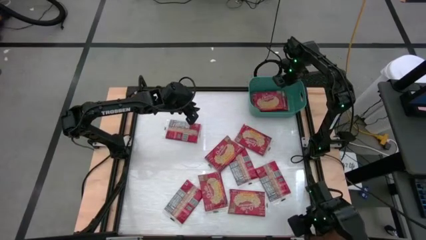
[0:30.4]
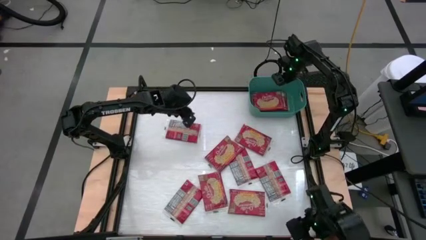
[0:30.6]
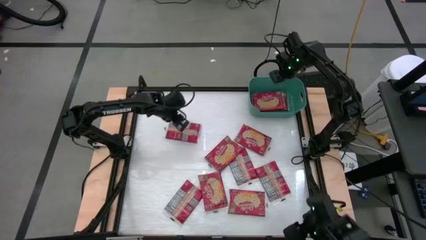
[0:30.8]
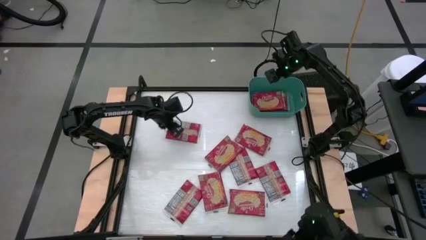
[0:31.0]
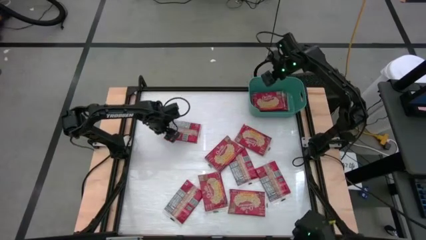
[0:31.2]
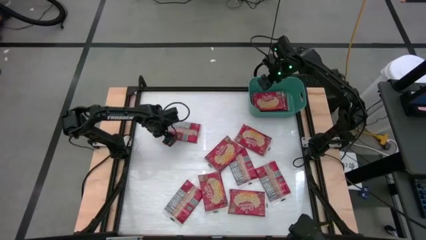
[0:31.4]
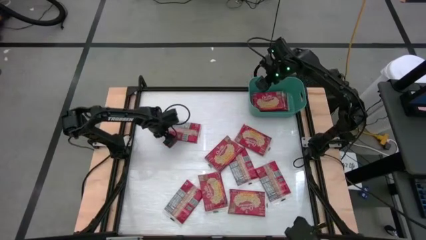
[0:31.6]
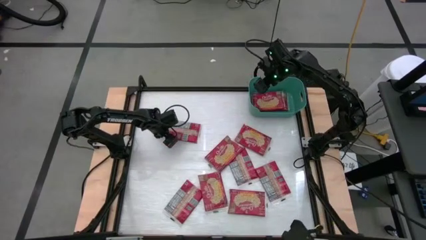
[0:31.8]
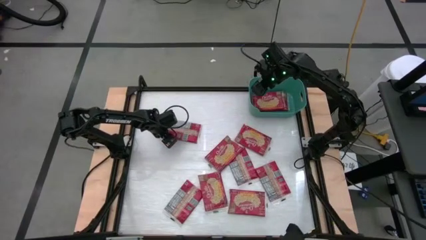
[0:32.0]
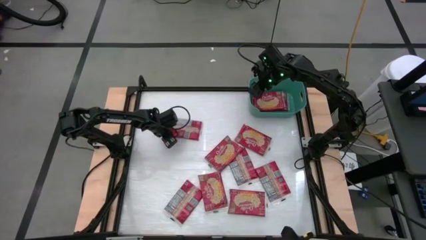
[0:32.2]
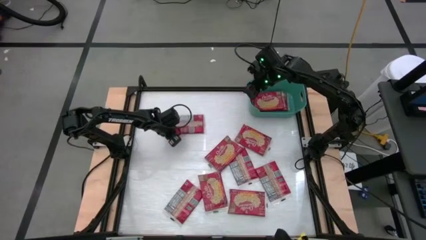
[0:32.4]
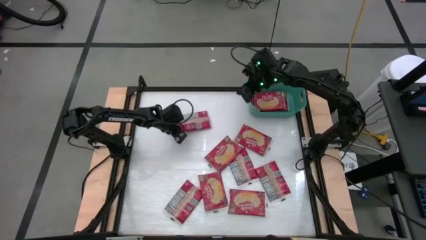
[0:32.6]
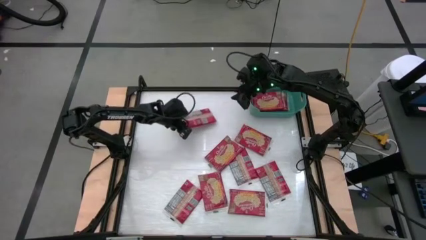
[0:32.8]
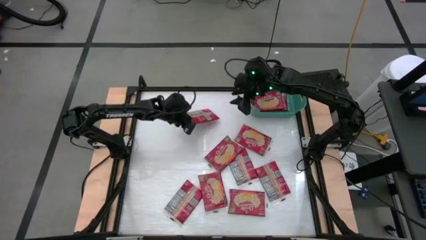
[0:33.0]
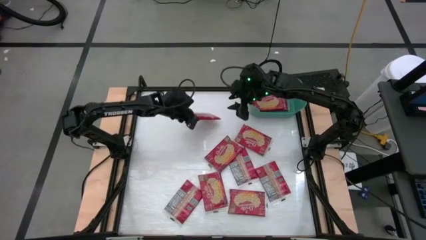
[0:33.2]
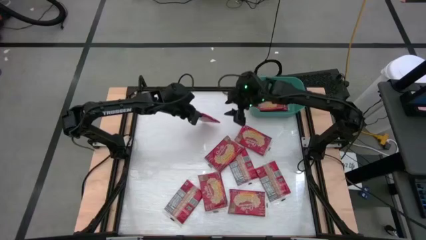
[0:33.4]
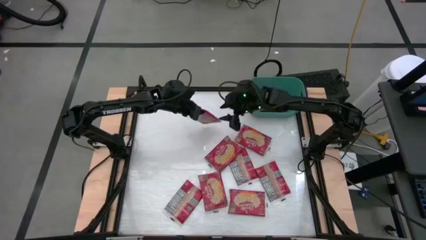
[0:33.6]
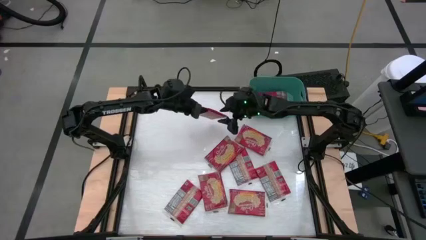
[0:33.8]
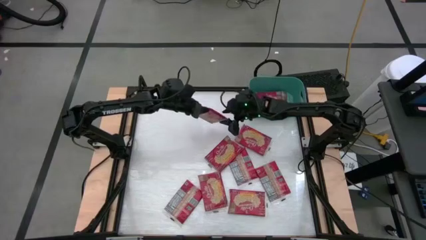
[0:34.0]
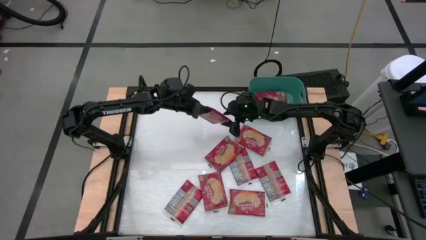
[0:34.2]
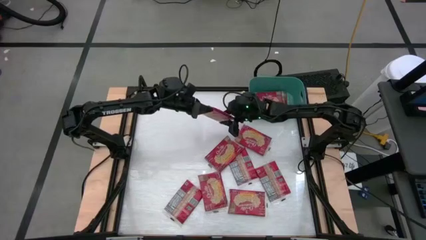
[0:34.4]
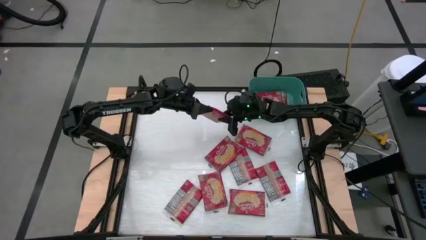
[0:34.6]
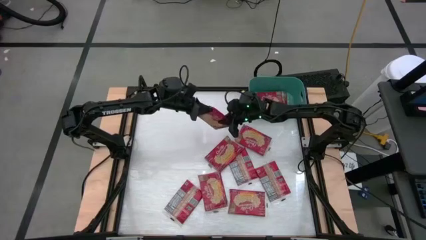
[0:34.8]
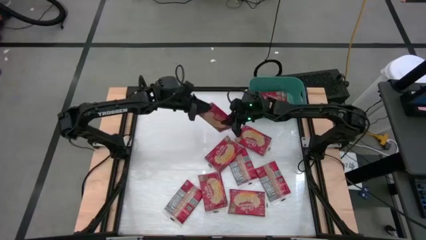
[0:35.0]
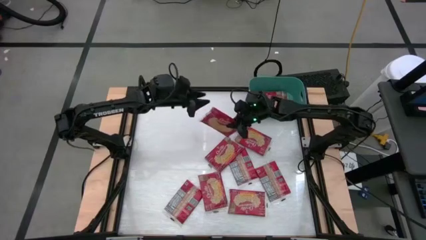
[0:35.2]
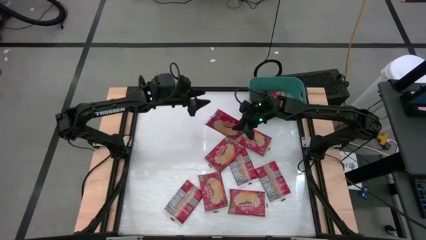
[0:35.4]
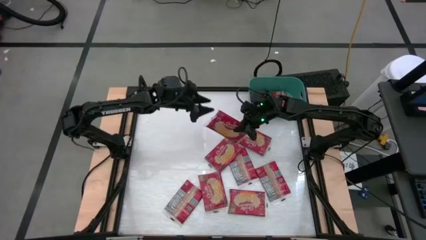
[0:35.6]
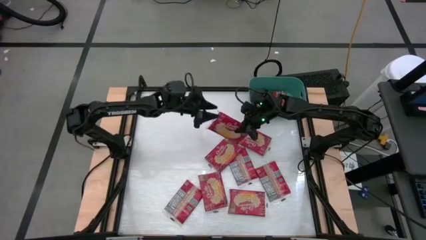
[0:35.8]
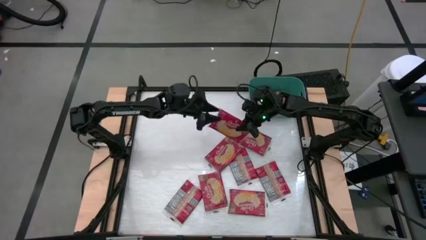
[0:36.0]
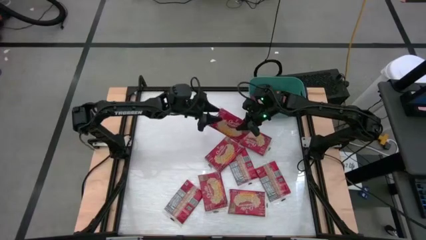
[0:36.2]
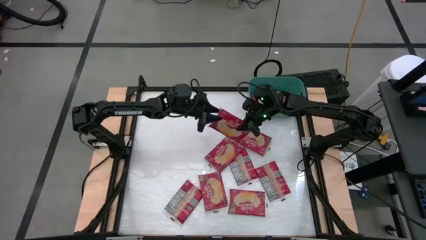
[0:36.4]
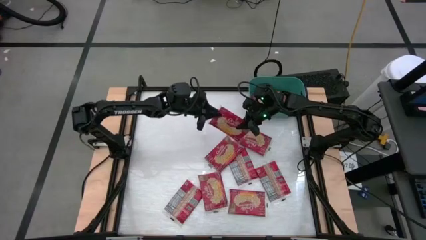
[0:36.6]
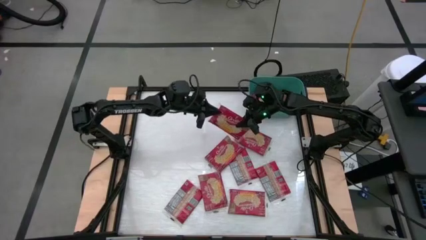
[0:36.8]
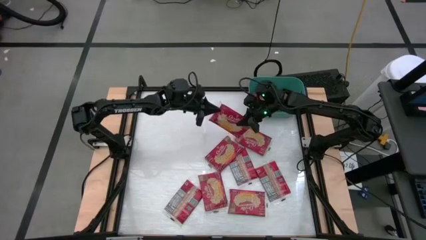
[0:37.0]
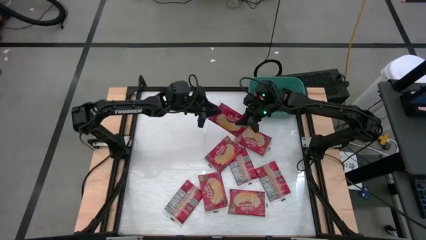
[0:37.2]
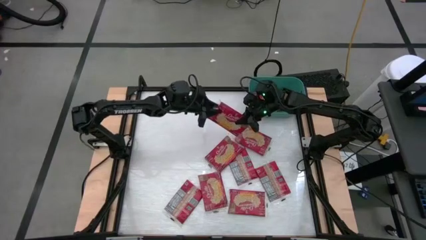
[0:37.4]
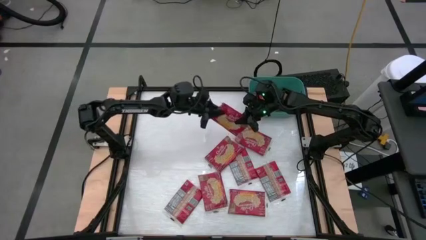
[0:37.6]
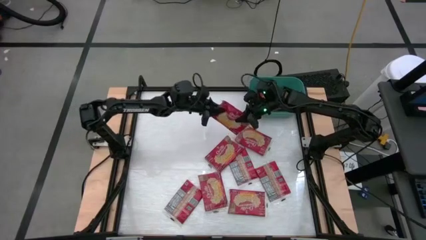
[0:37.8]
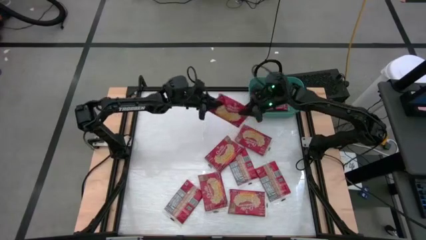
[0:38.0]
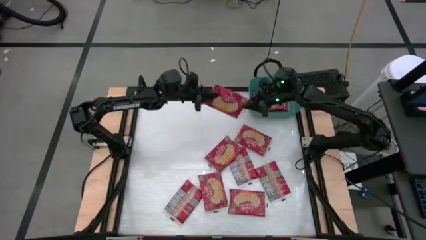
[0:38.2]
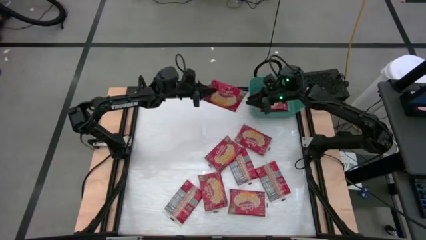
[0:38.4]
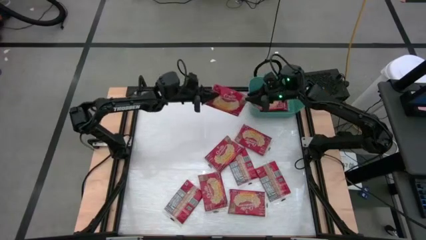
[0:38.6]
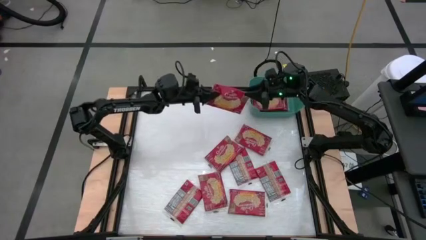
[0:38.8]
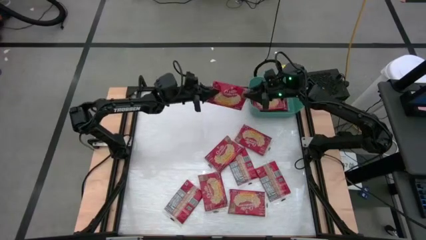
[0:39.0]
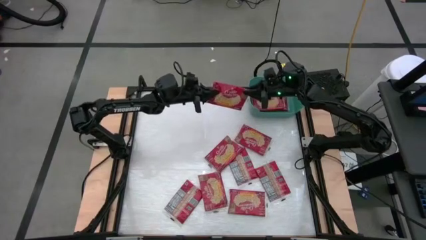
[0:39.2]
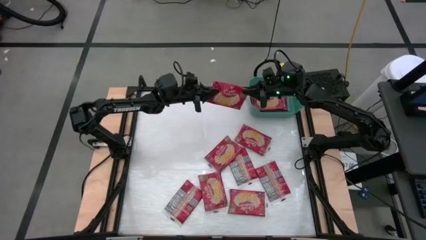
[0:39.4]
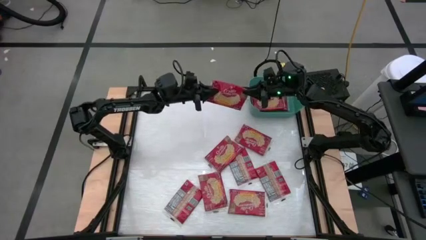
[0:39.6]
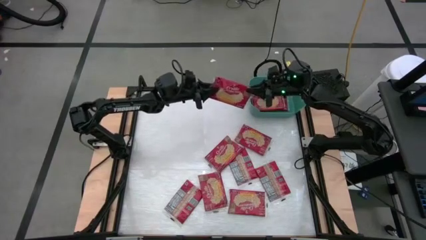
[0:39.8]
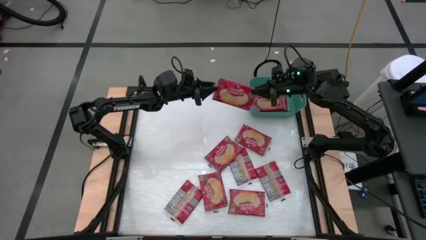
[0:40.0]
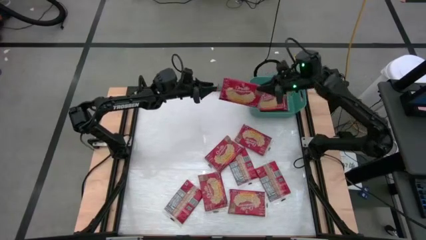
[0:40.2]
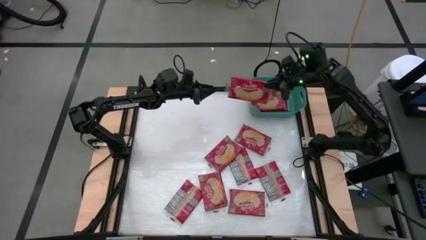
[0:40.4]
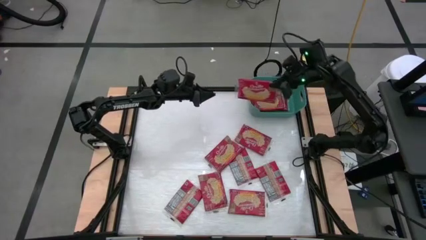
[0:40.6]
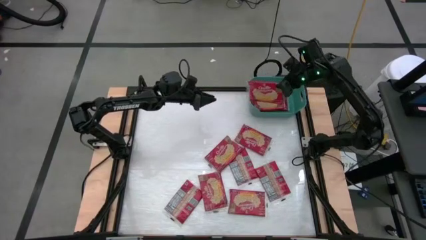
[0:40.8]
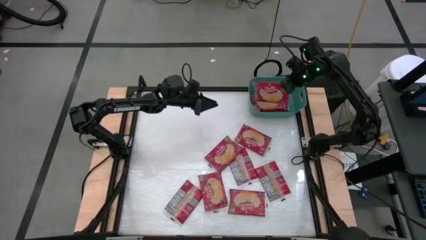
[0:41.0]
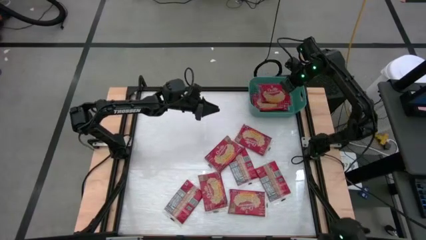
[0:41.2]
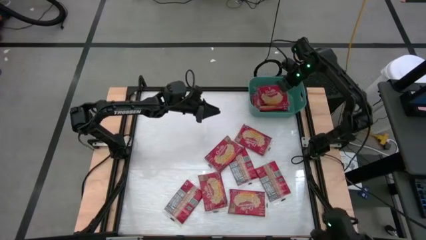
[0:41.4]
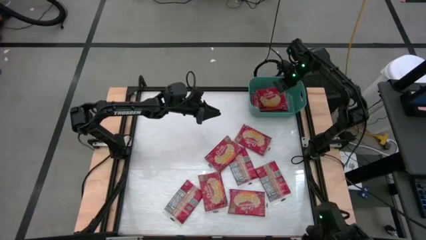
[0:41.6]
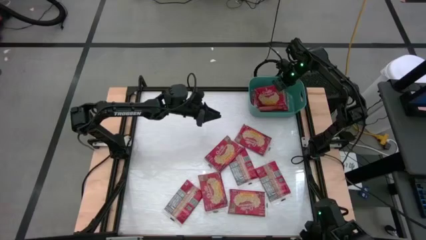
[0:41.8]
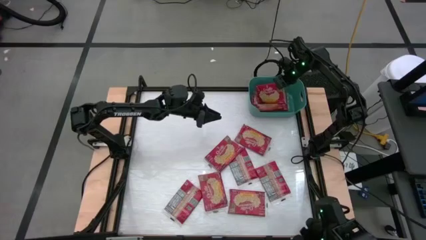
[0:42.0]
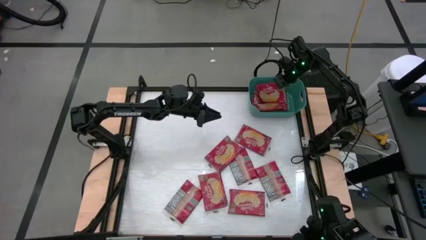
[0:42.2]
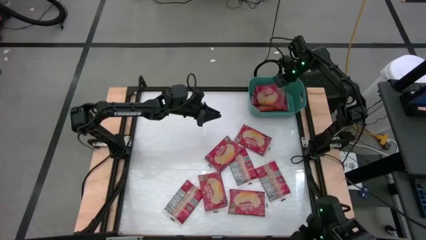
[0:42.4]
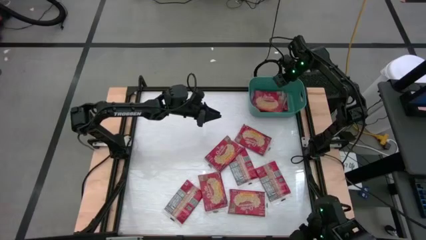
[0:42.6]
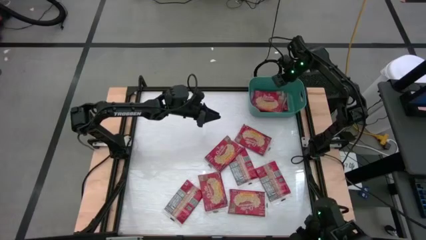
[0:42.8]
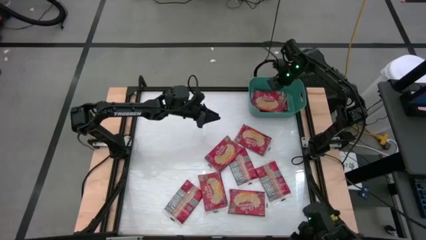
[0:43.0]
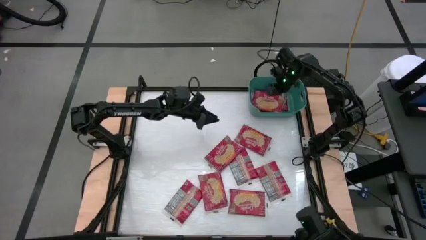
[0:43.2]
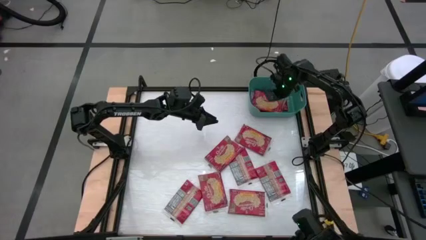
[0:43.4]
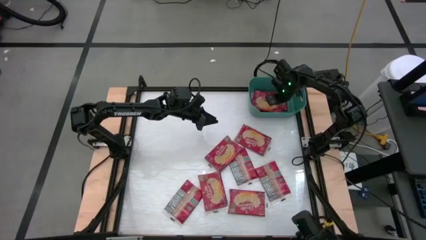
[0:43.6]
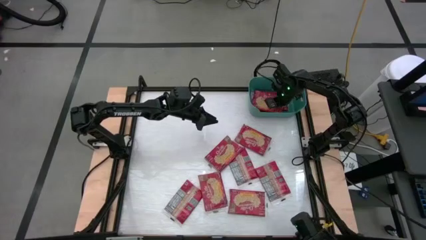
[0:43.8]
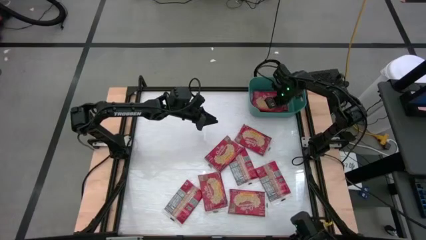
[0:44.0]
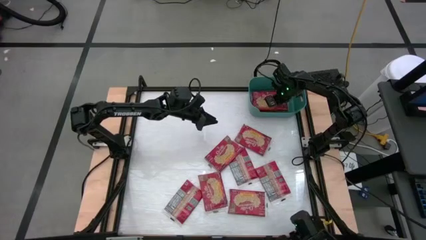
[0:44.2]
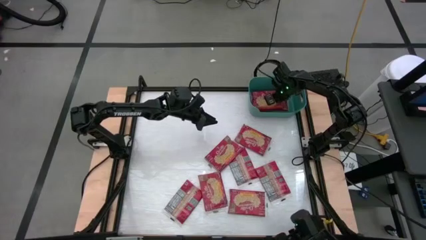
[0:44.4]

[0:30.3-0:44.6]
Task: Sort popcorn bags into baskets
Put the red popcorn bag into the green bin
